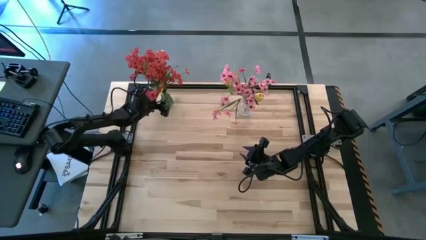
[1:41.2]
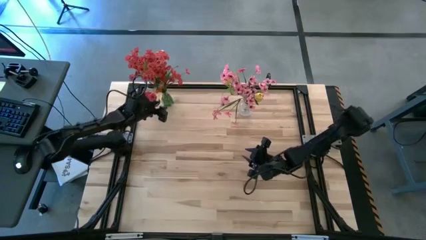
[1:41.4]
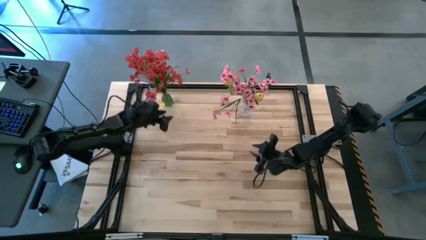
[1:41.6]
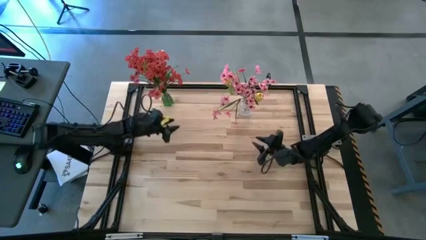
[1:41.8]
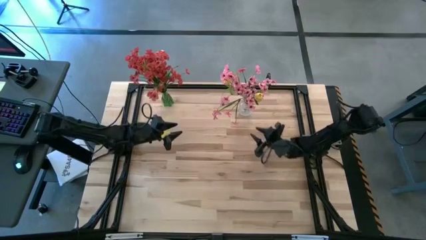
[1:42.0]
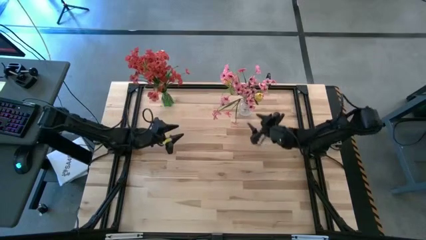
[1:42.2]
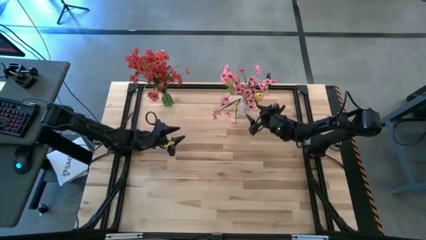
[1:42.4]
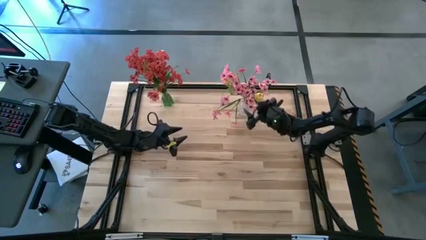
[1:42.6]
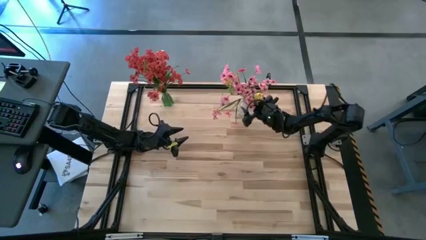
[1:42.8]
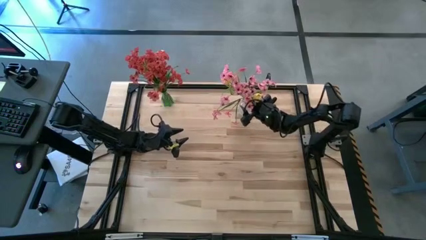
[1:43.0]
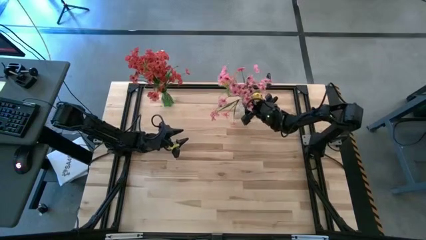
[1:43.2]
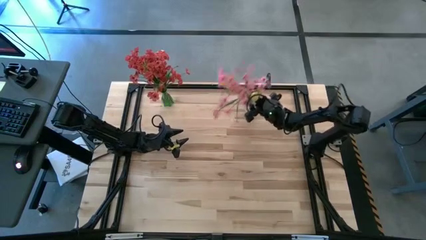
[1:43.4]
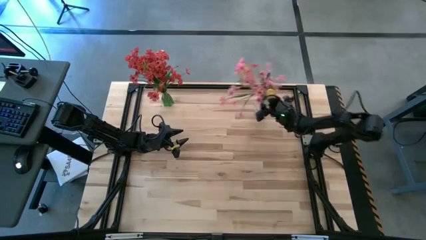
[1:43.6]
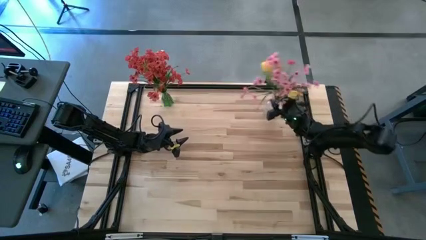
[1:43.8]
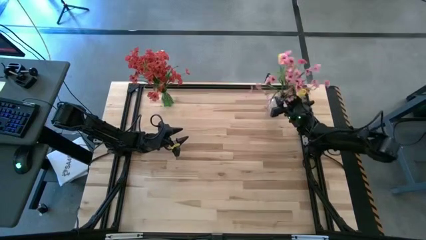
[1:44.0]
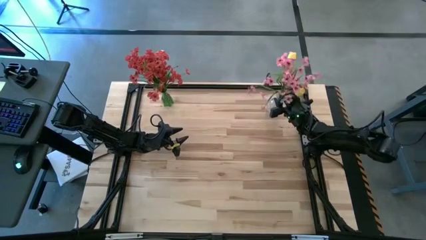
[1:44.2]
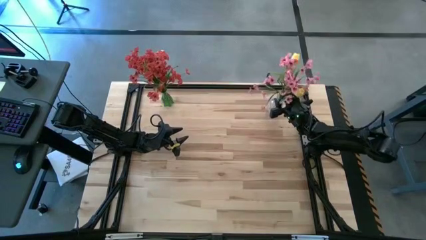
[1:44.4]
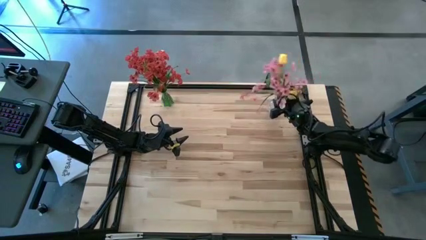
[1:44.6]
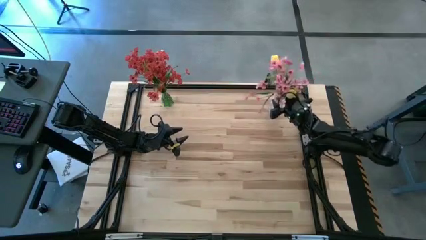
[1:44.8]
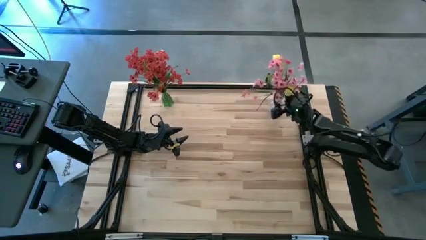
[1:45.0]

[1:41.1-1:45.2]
Task: Sort flowers into vase by color
Move the transparent vase to the top right of the table

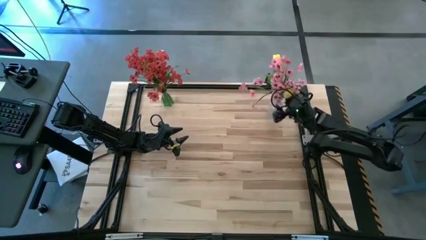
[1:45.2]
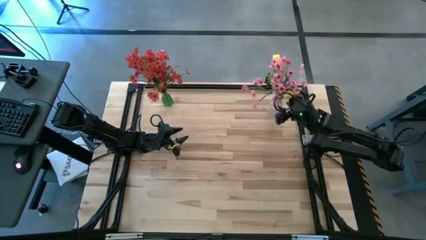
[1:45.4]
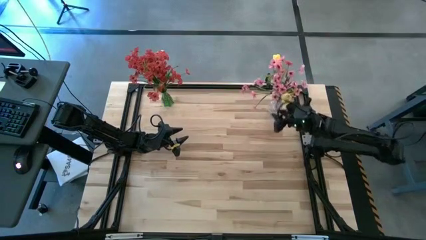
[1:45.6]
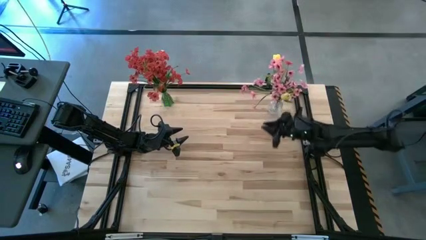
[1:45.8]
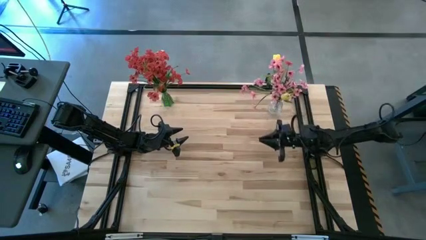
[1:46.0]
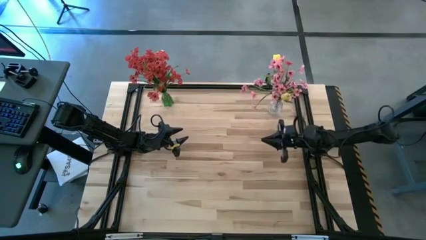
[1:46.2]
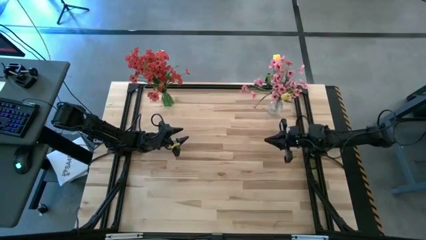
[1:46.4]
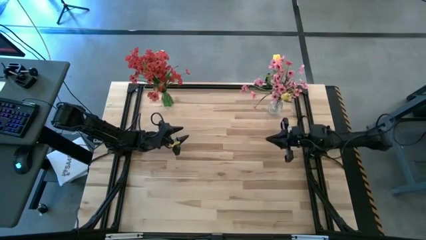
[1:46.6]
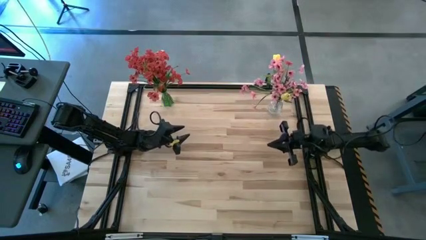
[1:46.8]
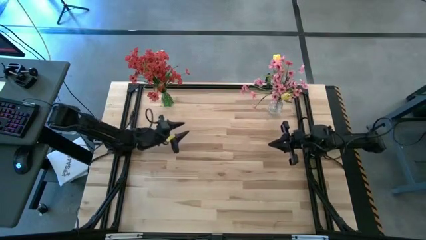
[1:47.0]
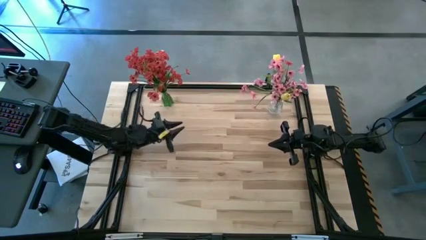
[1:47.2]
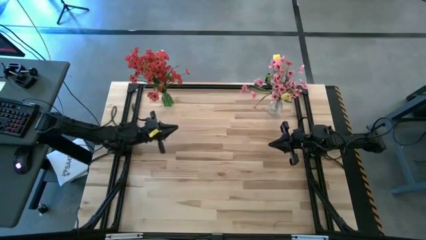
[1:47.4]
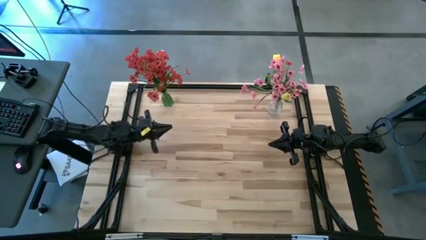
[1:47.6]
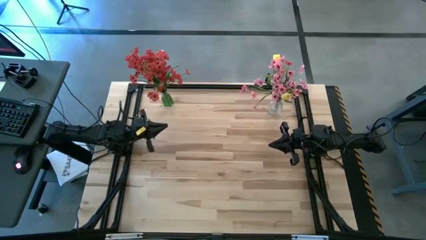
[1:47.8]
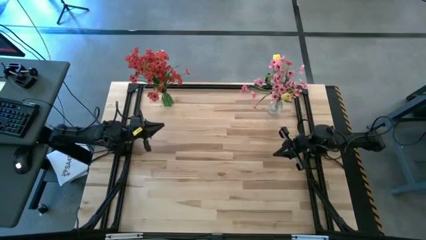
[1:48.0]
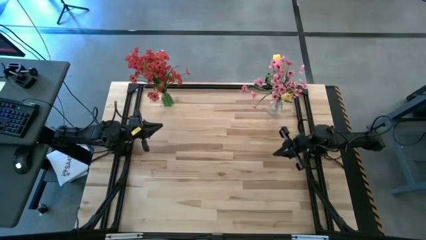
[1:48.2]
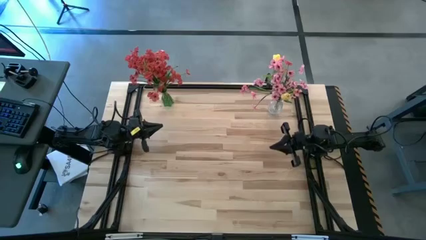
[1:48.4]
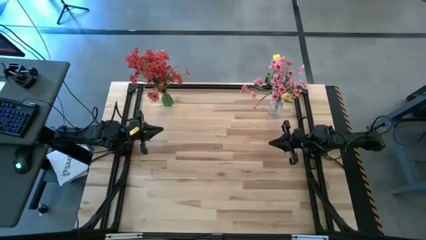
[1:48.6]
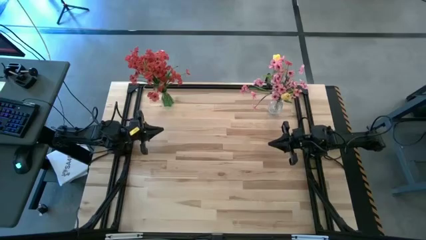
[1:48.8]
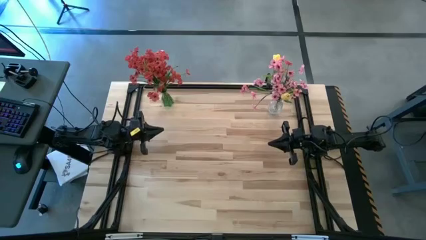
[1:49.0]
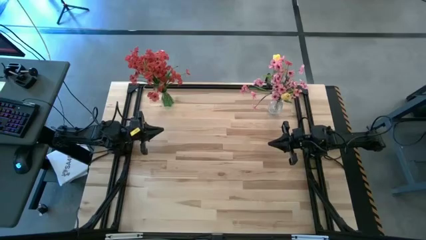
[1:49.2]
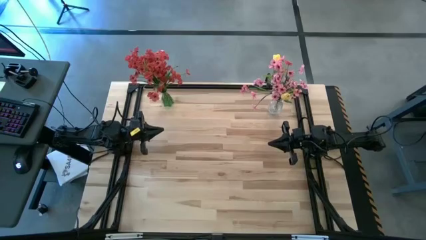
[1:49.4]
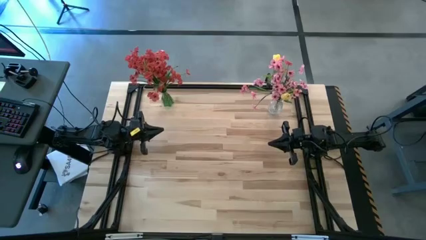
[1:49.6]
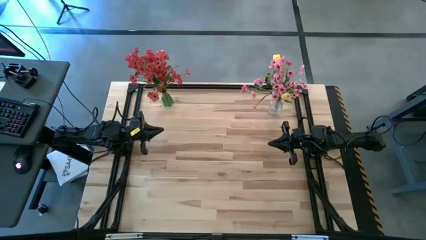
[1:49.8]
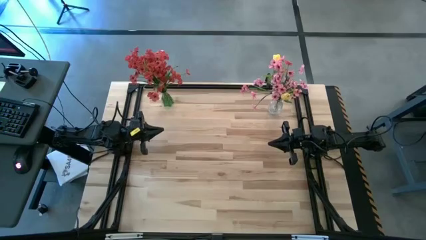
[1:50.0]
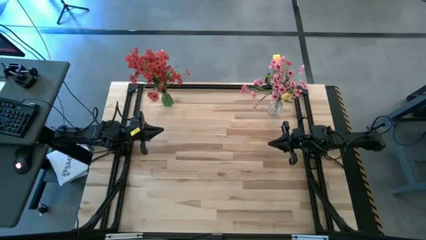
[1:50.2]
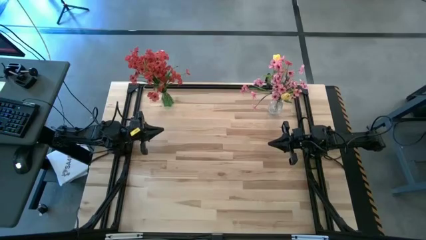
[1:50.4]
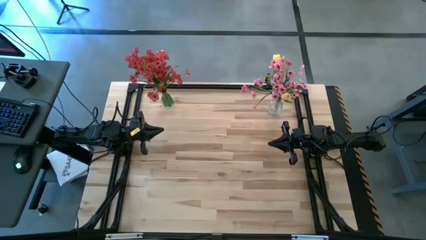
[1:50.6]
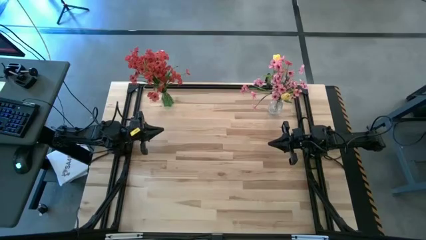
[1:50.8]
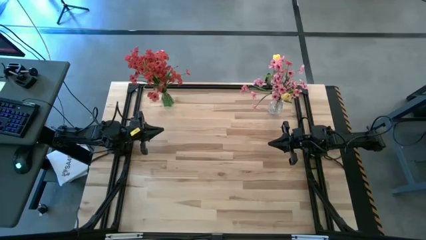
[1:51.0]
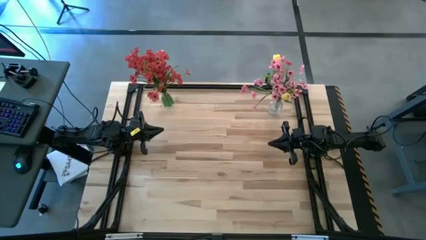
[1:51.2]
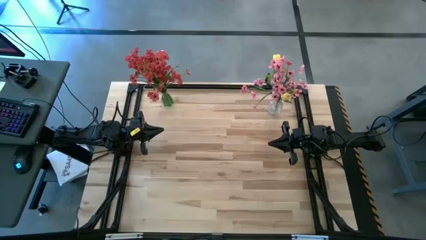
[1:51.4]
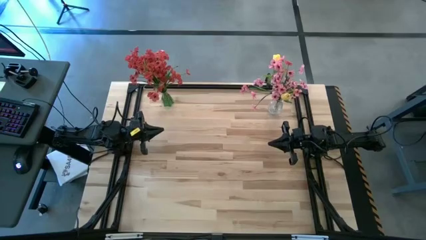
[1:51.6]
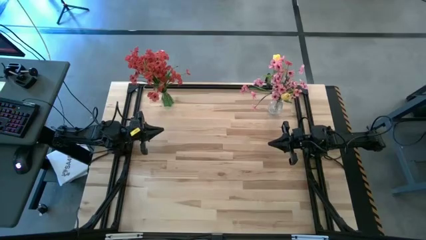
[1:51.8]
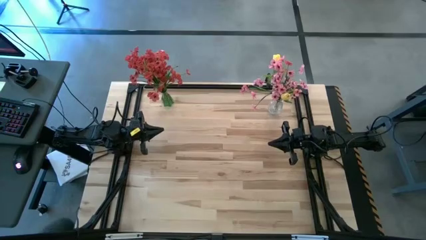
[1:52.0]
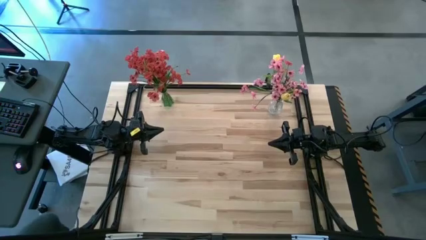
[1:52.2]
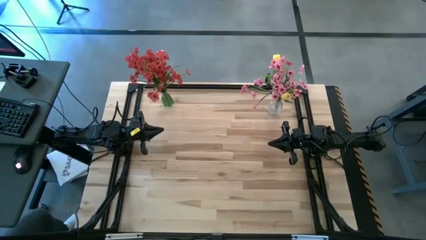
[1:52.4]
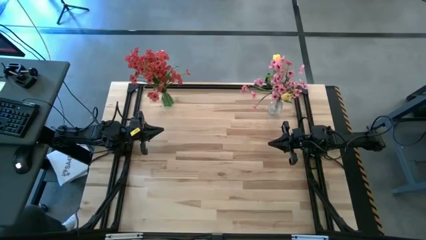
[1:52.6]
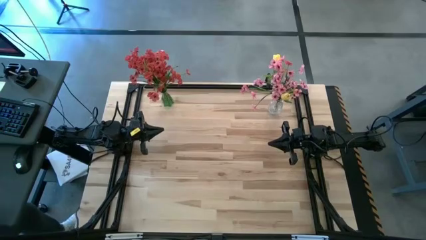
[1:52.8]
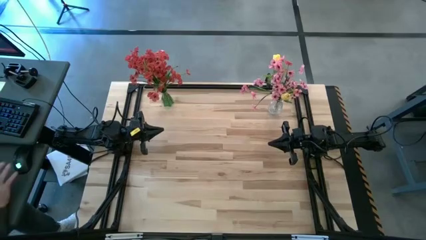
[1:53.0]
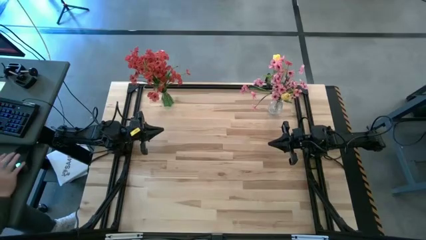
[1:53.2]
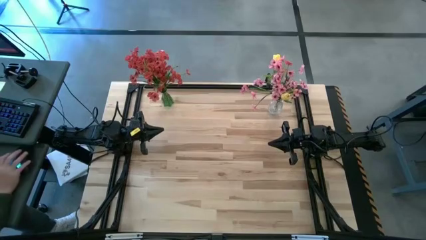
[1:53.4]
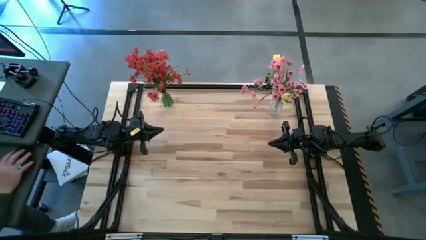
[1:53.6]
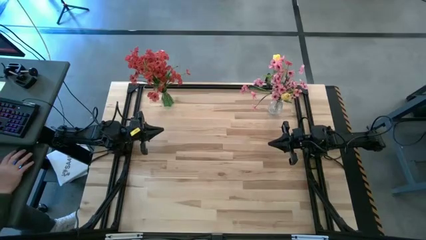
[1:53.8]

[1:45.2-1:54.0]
Return to Home Position
